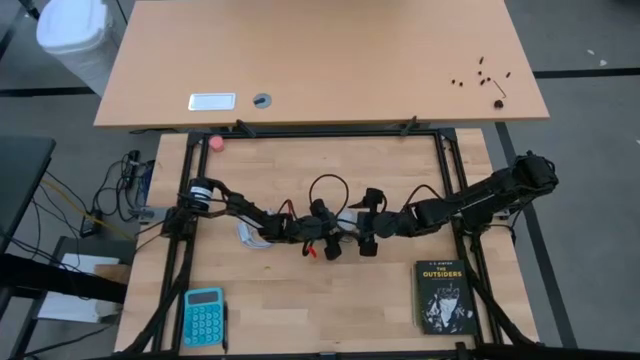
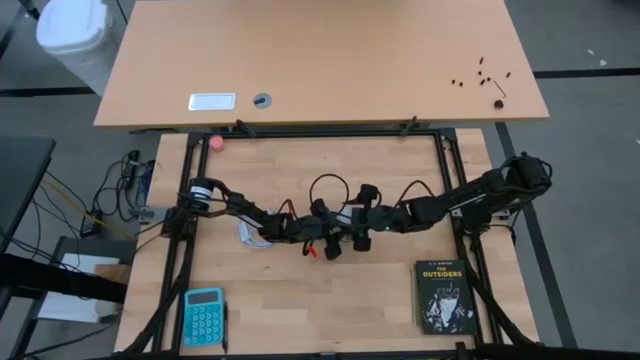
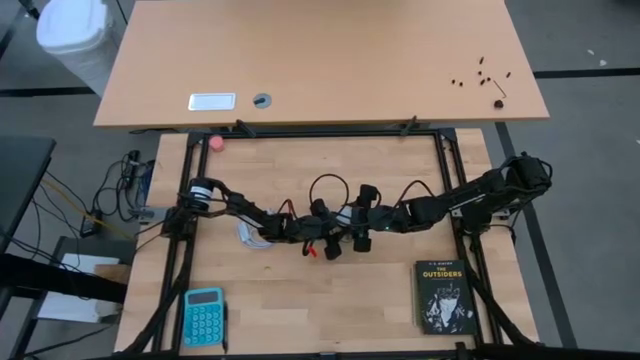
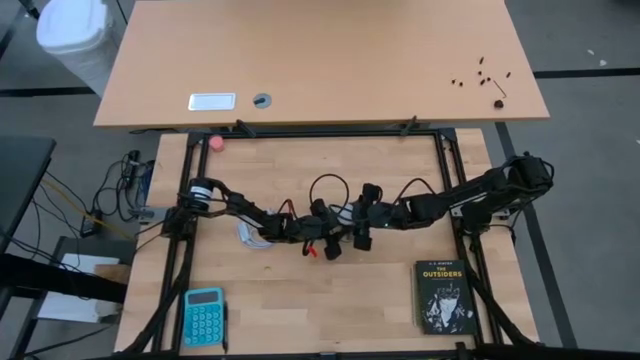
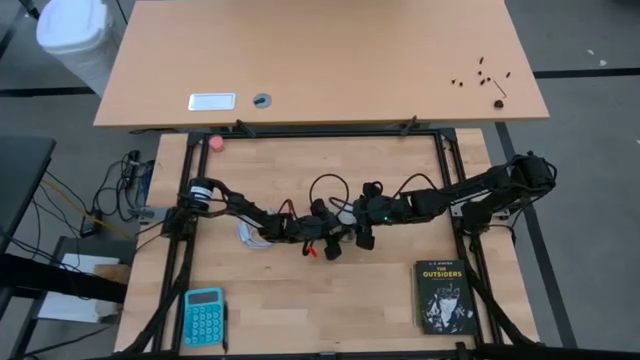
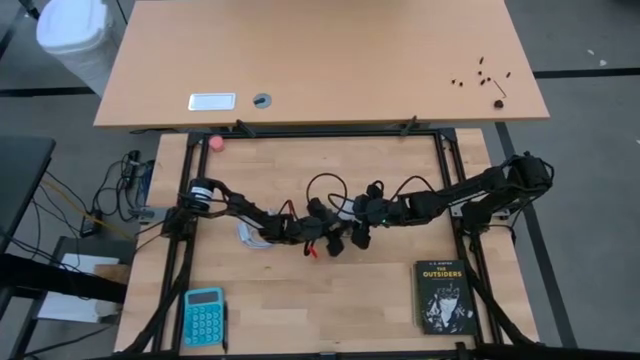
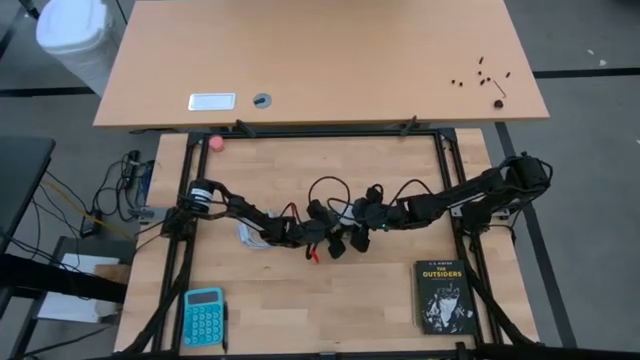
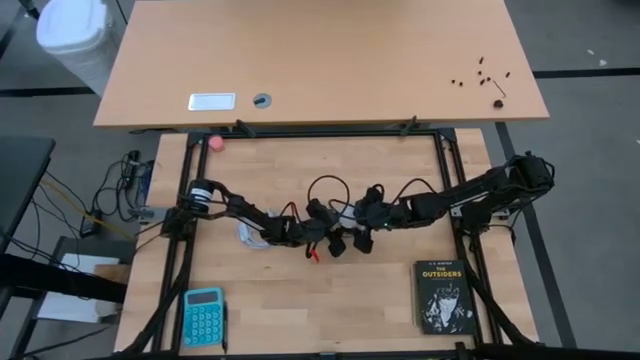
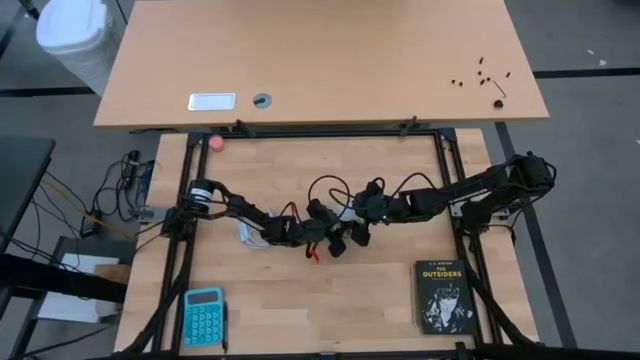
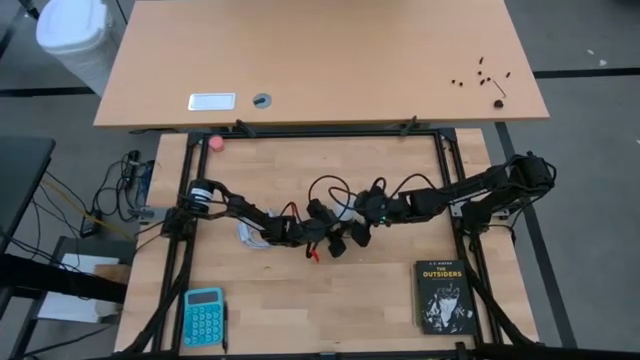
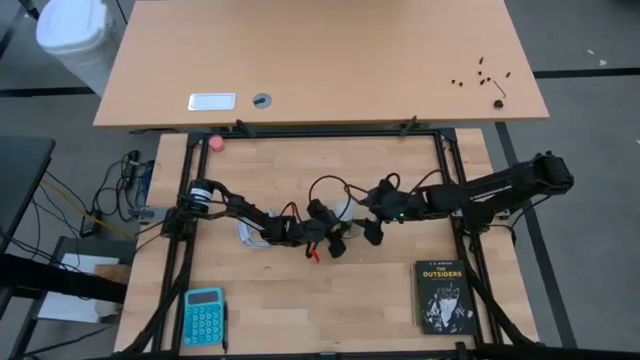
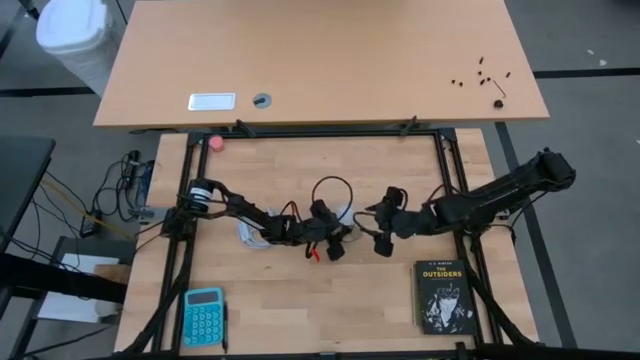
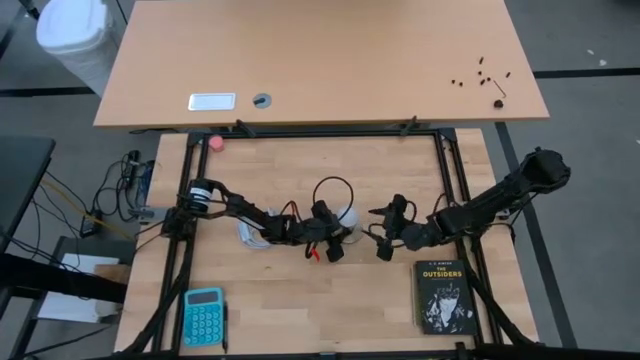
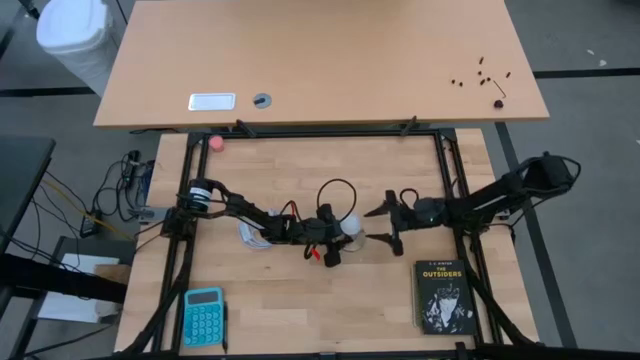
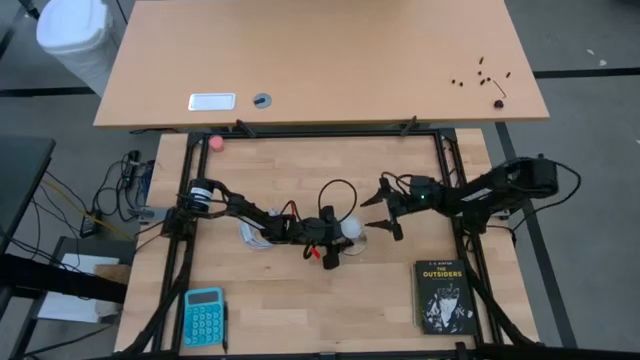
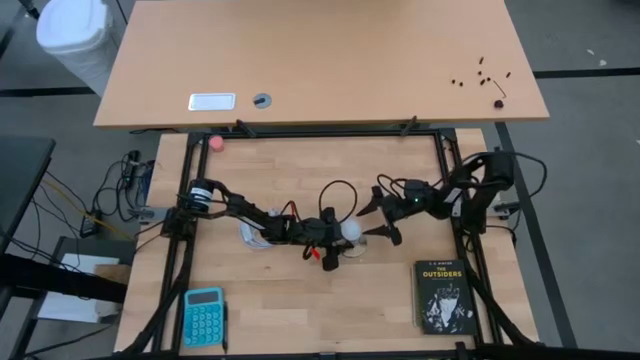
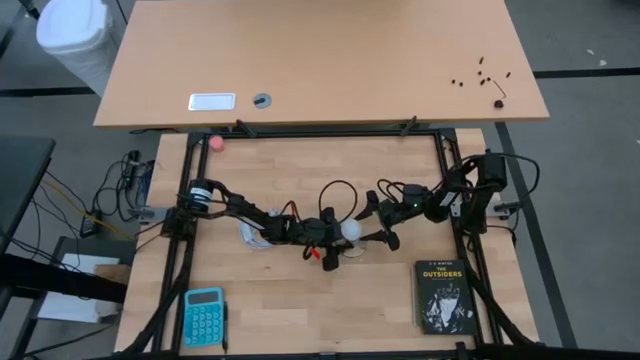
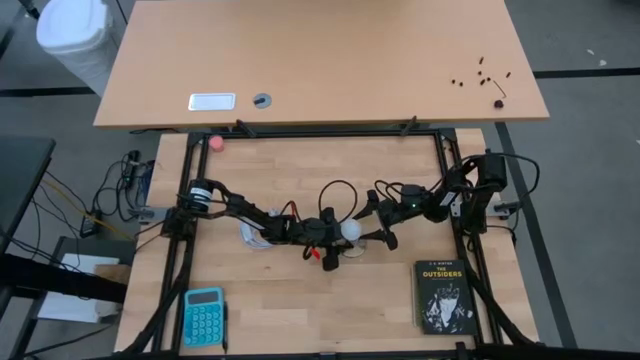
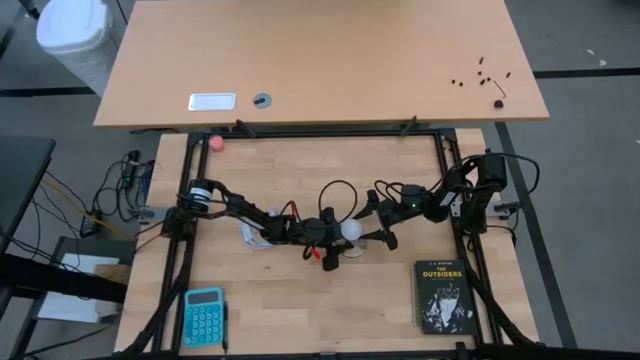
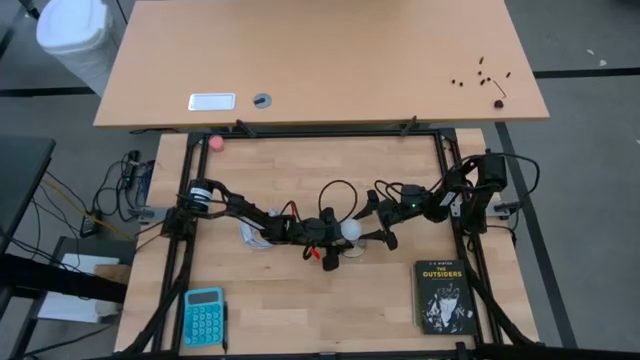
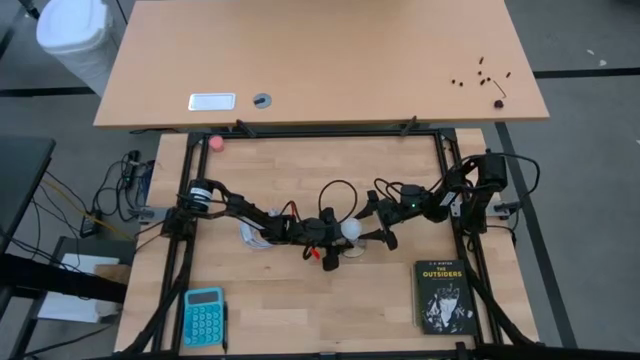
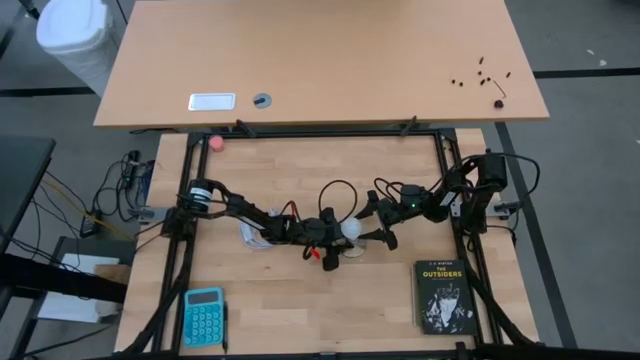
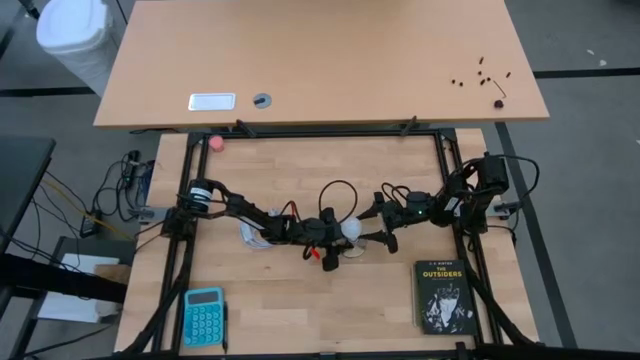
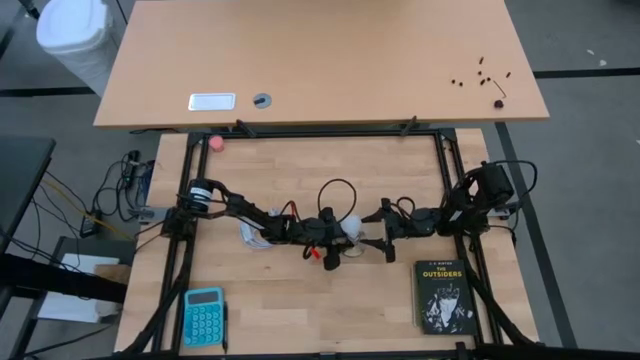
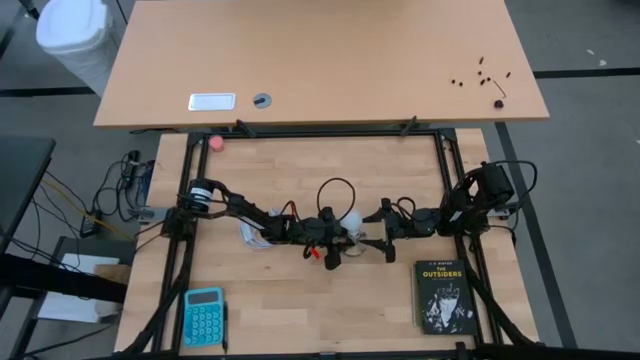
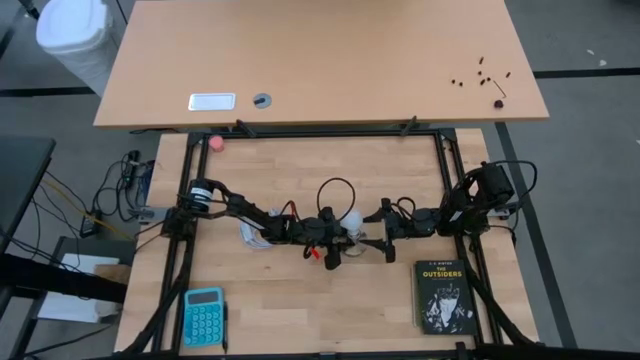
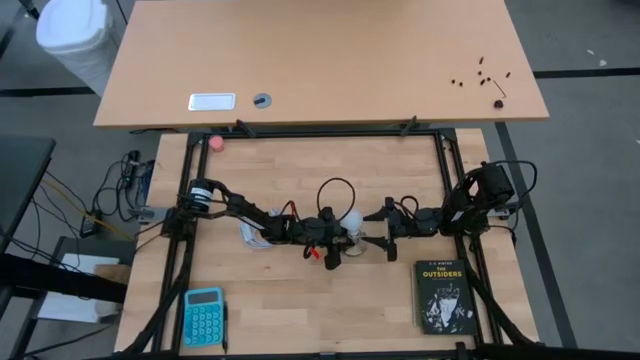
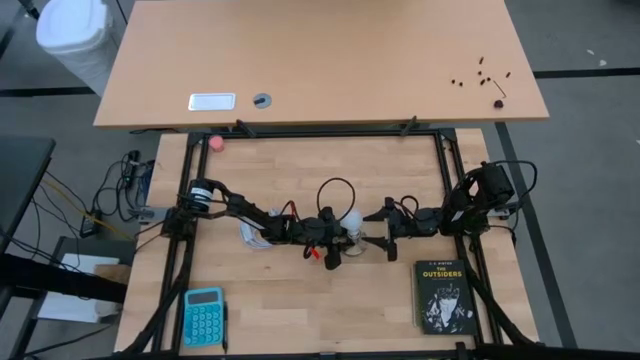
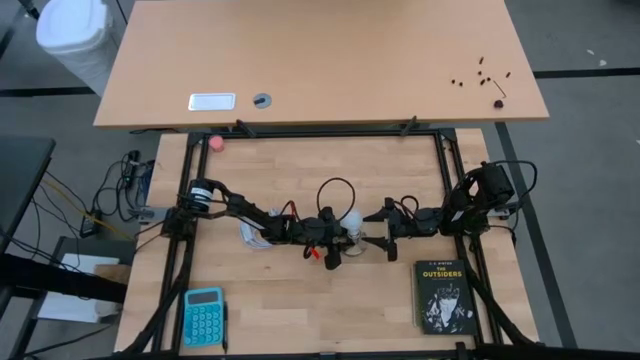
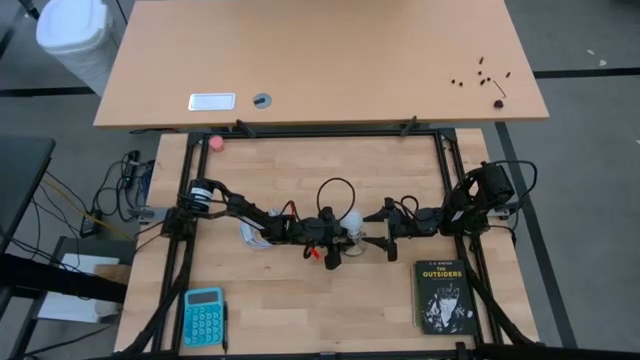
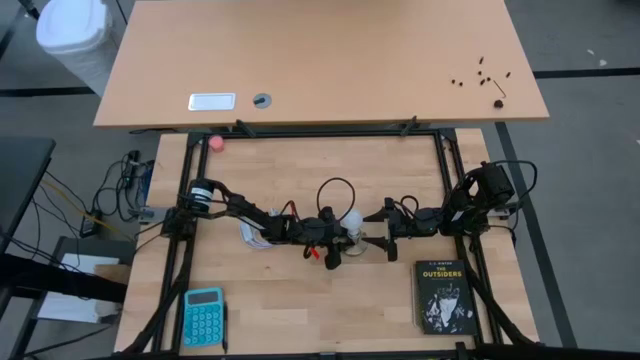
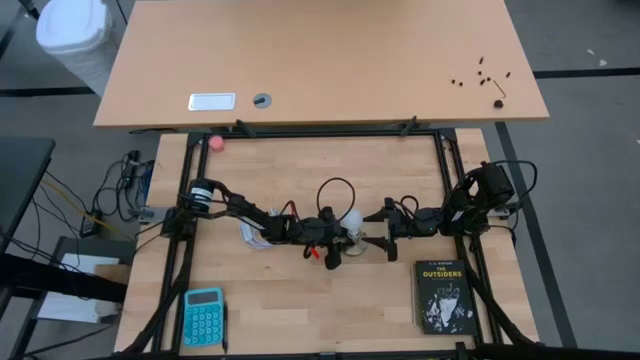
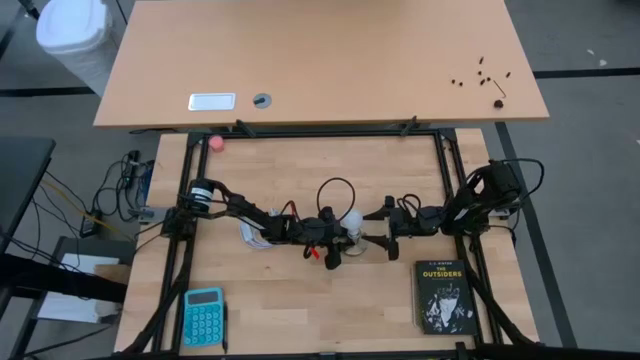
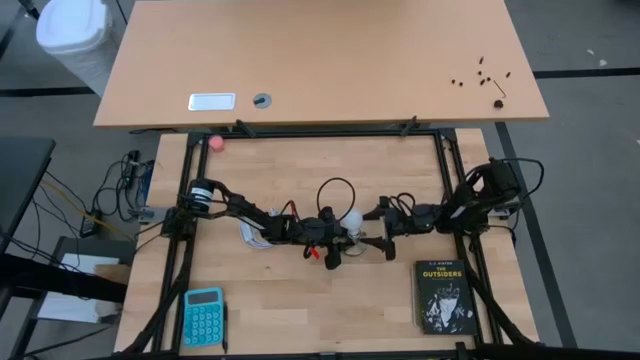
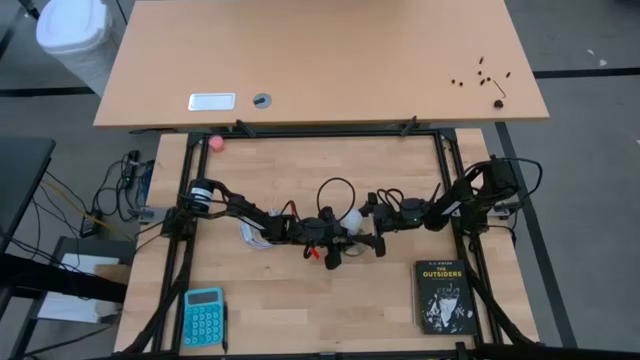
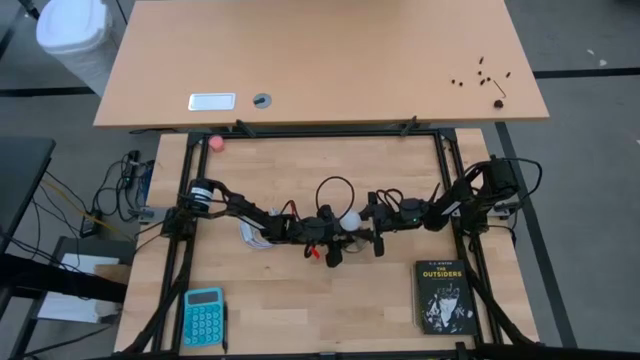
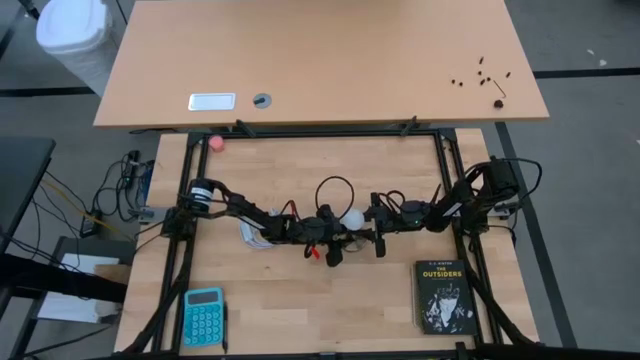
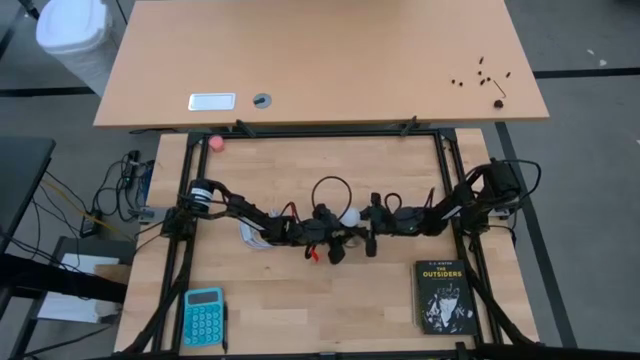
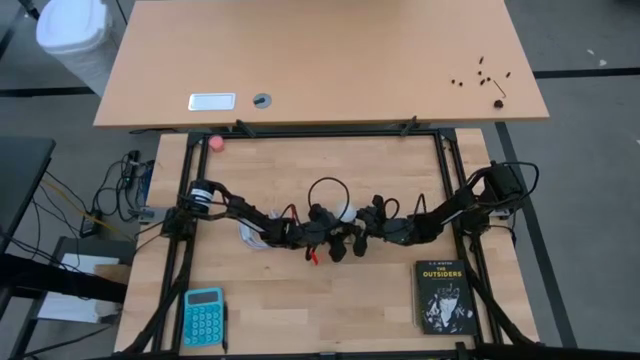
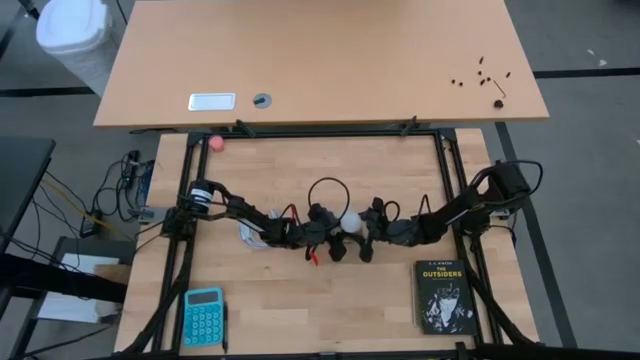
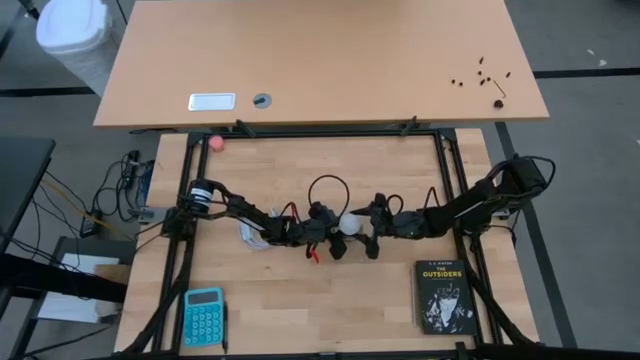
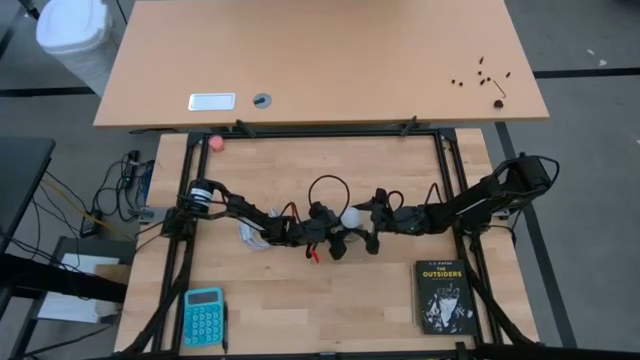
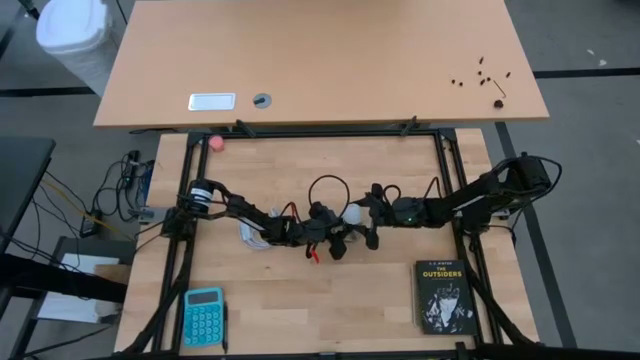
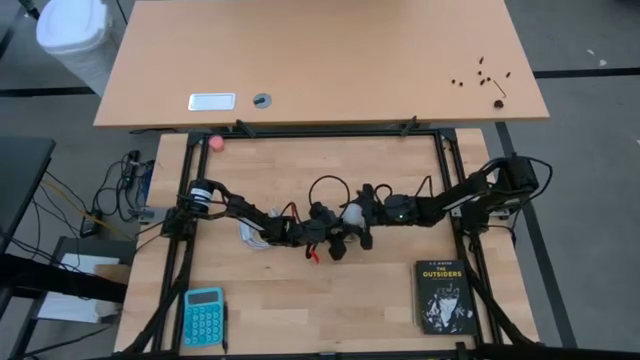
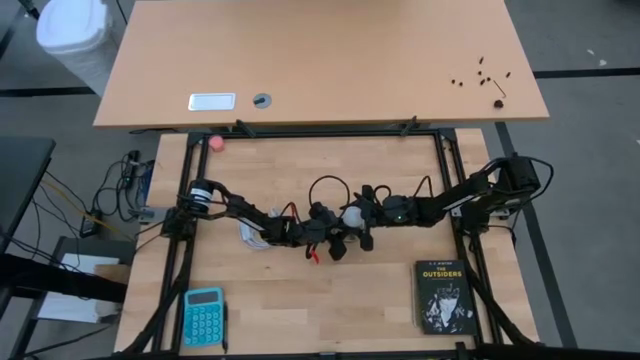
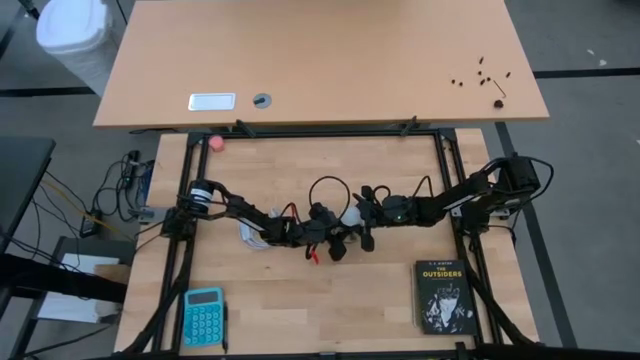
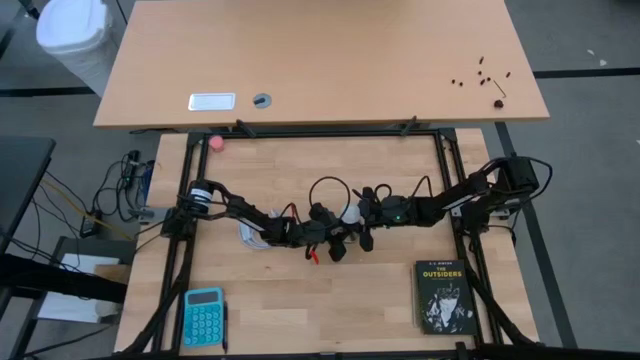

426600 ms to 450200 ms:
Task: Screw lightbulb
Insert the white lightbulb into the silver lamp
